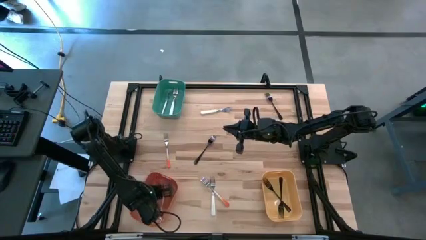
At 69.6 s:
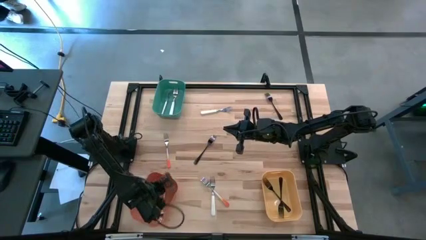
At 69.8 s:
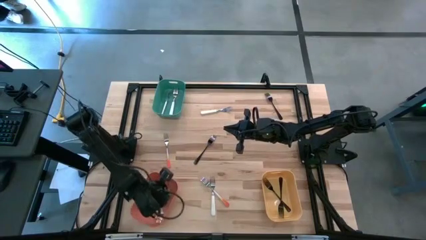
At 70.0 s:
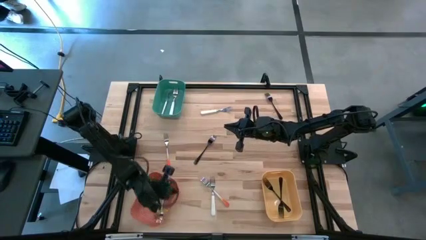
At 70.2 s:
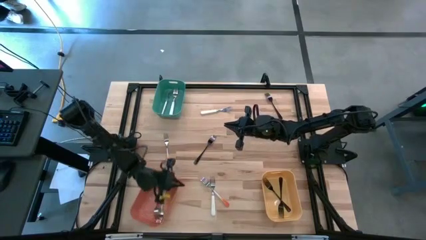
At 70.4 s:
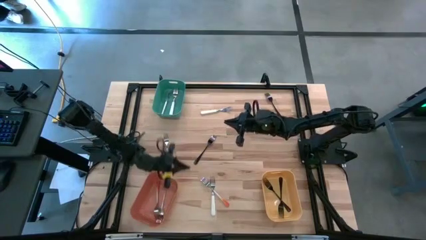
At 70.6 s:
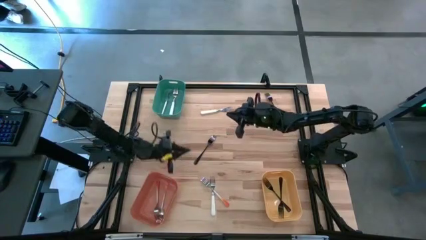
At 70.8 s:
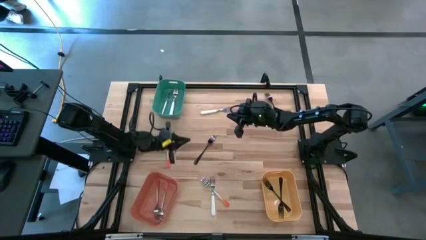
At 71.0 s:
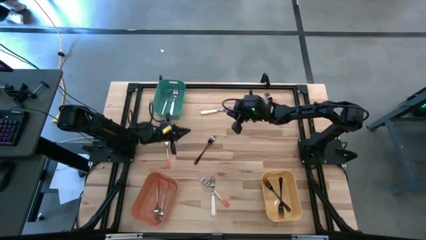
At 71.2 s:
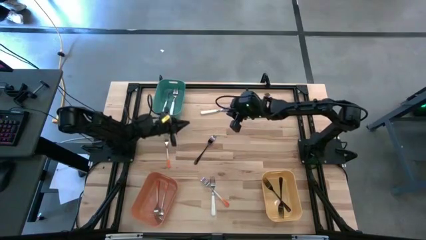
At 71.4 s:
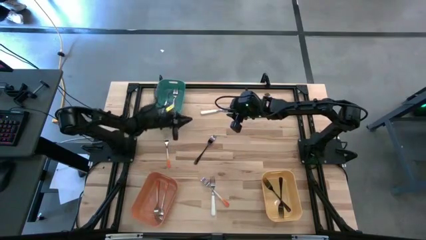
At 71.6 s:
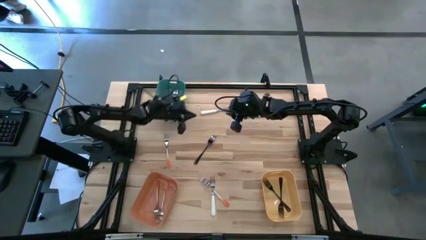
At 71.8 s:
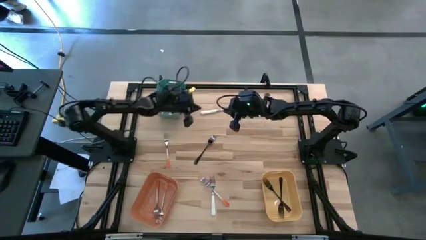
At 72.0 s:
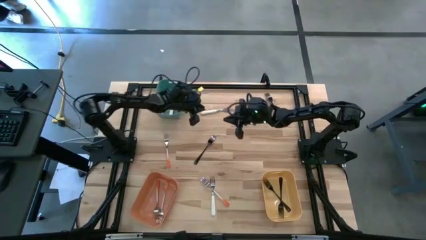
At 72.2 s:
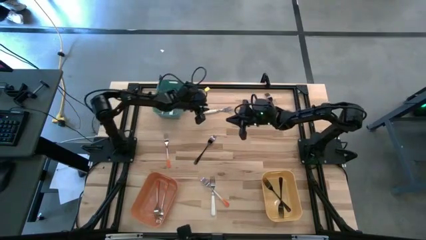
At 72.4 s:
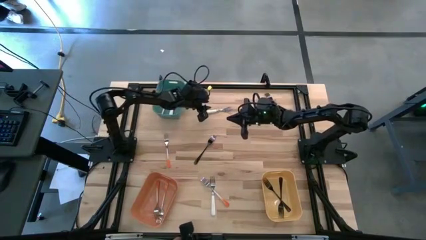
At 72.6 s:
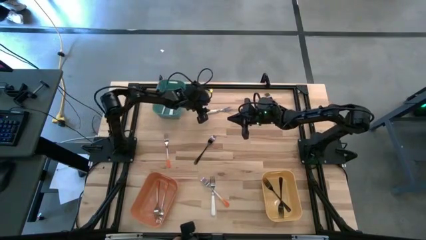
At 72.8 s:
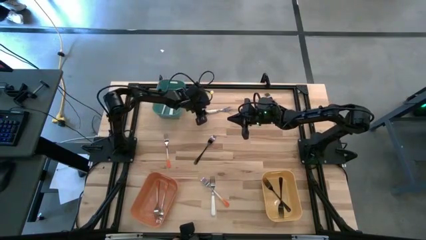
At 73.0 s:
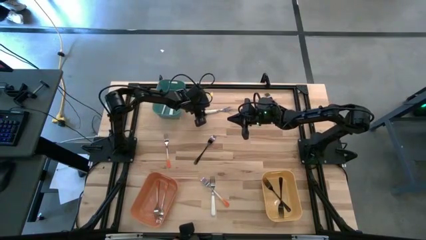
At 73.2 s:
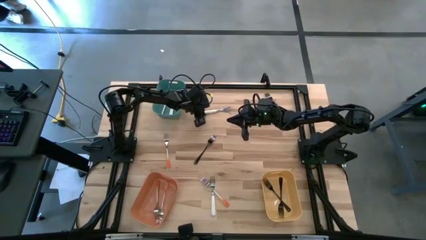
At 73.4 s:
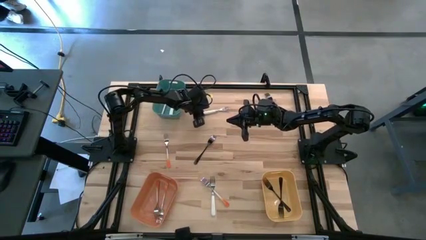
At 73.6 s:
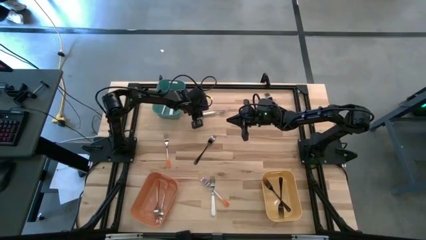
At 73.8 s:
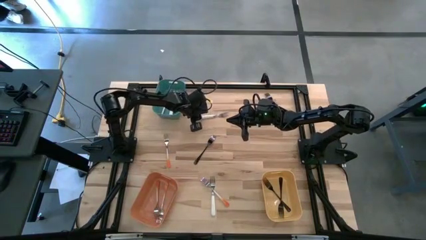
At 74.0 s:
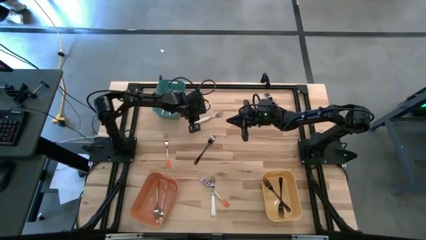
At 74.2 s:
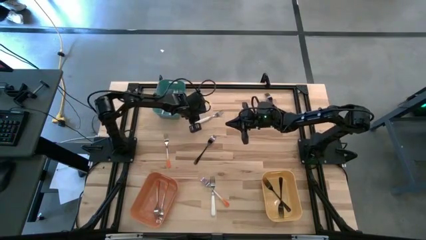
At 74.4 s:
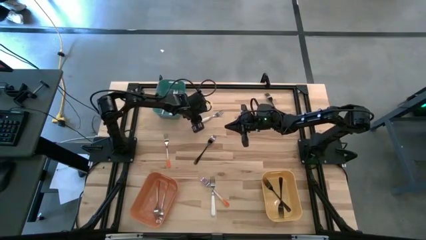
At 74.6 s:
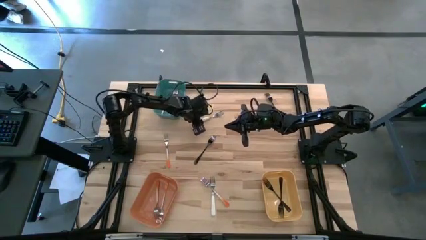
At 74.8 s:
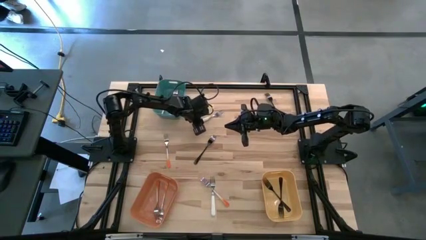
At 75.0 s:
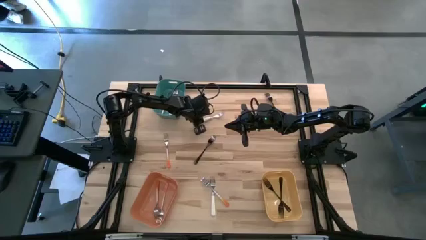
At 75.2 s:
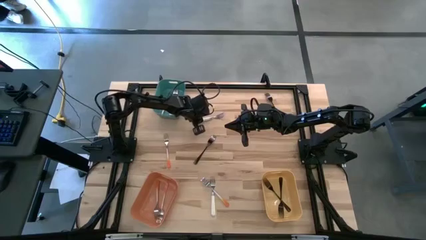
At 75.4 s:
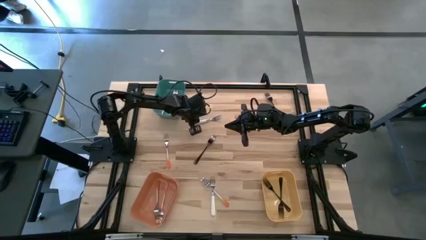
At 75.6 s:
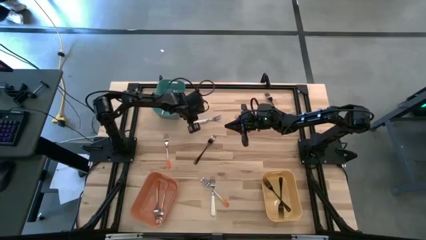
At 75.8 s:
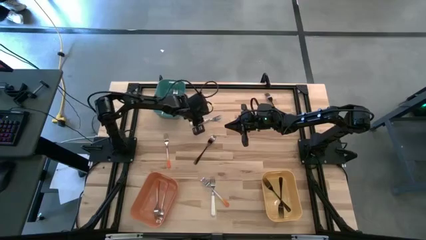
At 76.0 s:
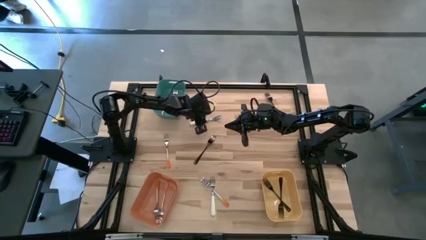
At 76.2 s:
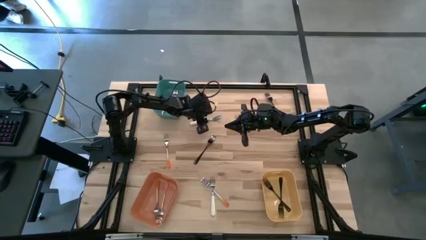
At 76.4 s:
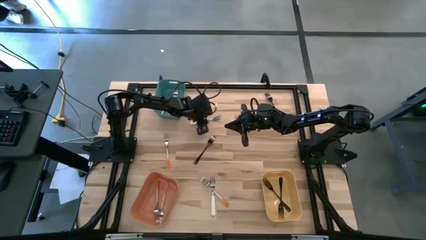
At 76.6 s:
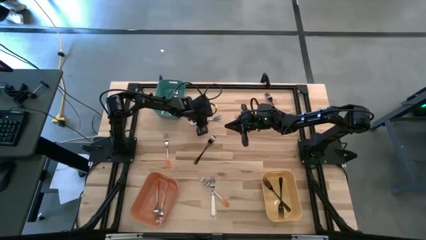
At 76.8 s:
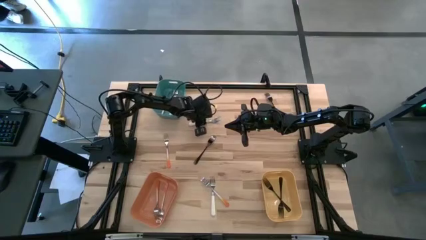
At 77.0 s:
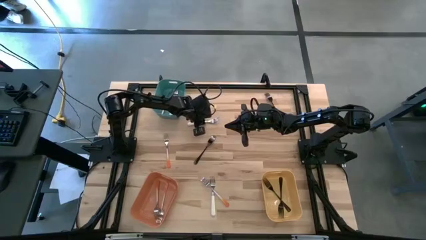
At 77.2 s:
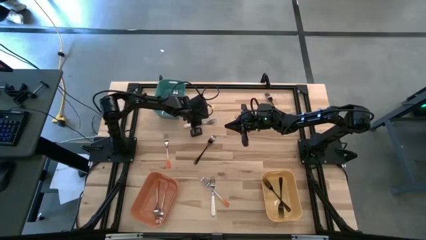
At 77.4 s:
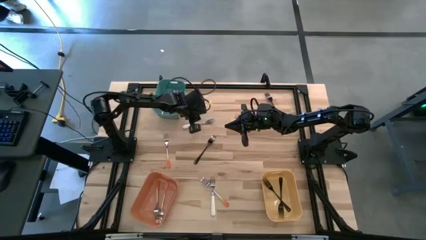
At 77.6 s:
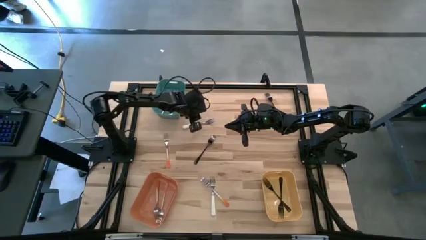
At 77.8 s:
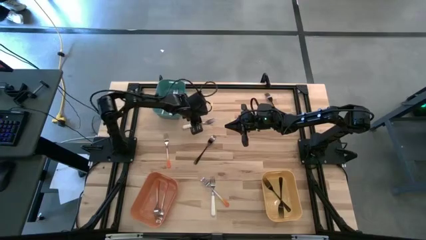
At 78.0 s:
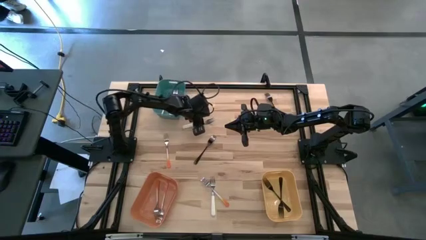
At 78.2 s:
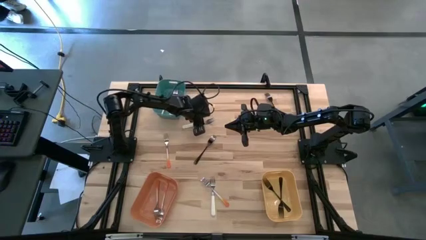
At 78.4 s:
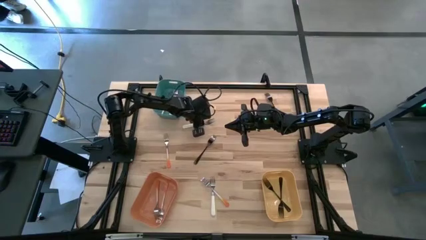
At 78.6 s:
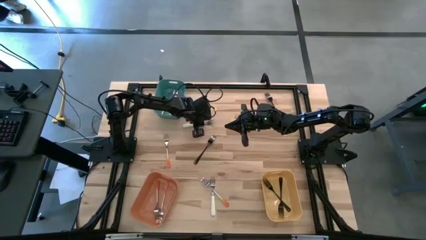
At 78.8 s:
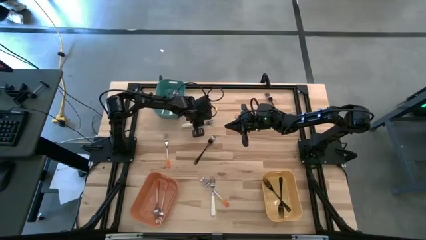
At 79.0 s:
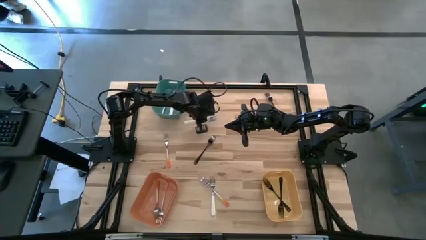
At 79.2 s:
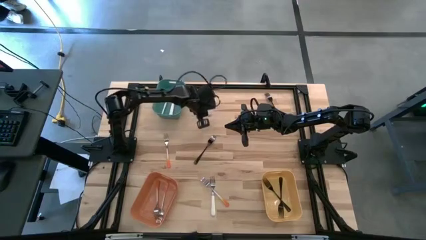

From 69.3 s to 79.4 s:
Task: Sort silverware by color (type)
Put the white fork into the green bin

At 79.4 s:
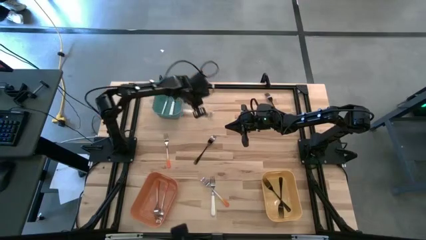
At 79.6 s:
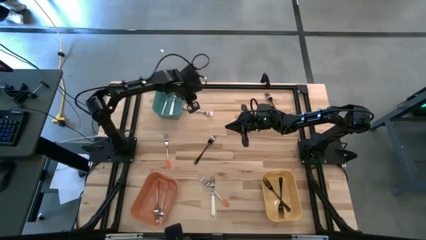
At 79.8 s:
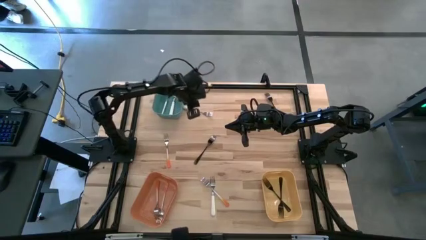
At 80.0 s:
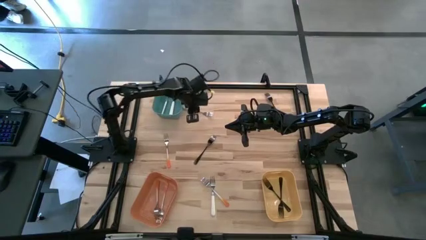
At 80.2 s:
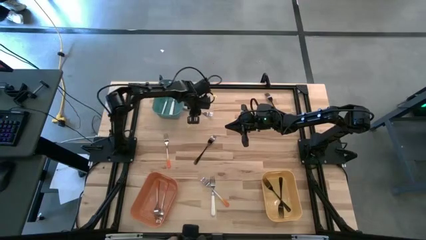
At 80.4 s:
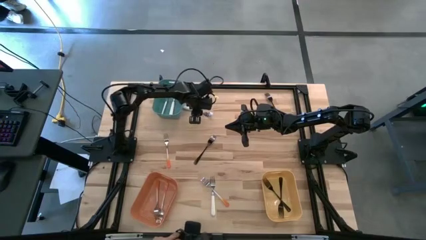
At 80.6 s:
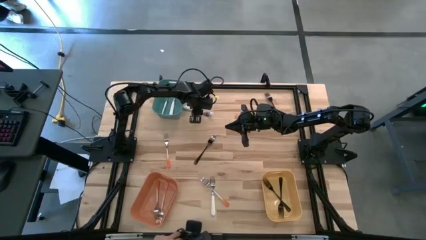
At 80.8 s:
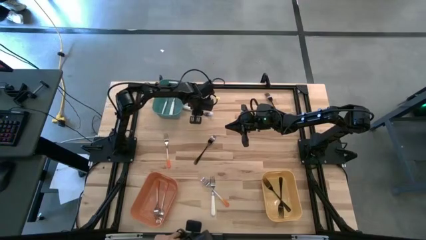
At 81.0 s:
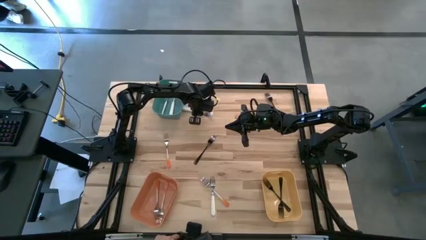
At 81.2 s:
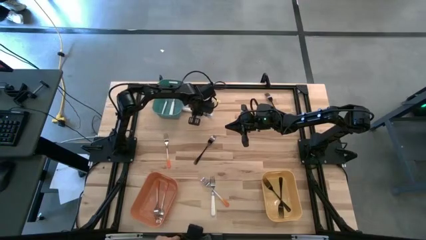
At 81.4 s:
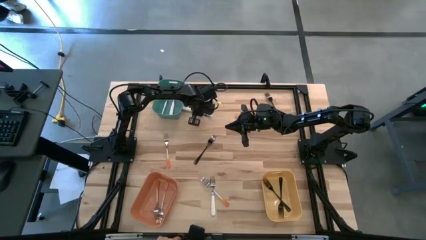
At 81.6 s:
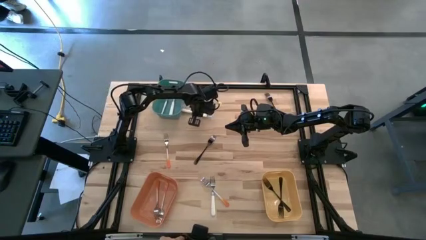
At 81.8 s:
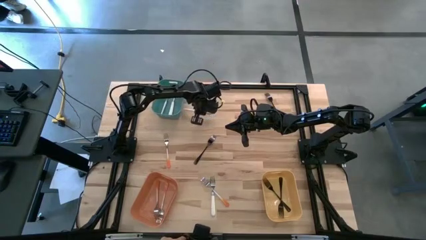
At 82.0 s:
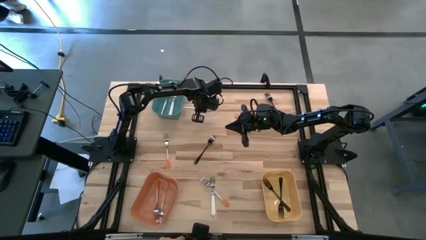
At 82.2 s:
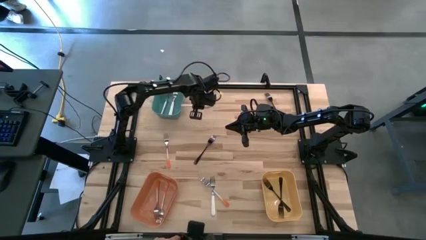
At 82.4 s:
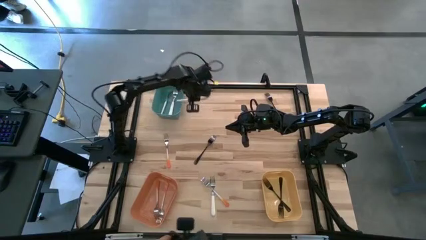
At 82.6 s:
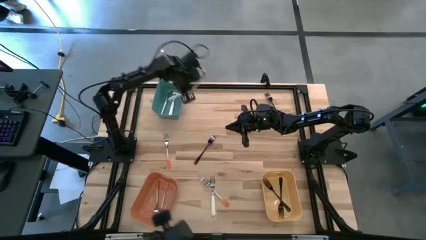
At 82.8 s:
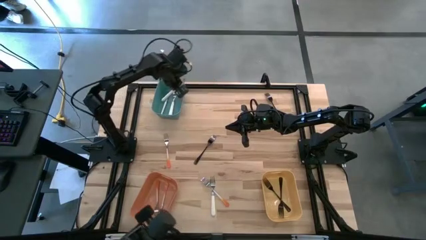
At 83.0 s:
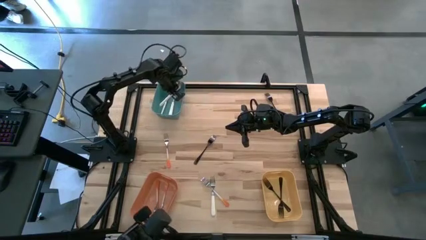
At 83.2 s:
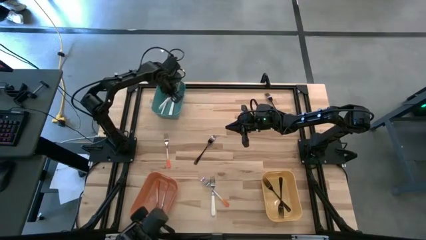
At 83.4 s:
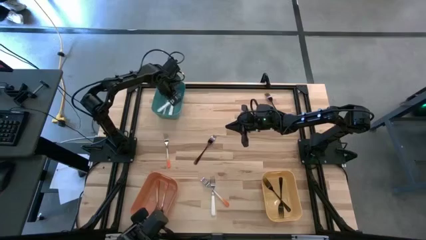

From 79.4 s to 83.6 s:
Put the white fork into the green bin
